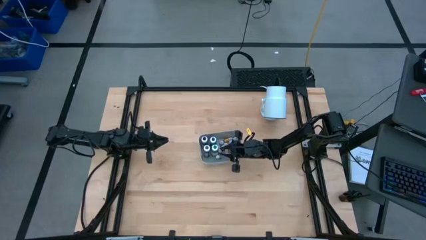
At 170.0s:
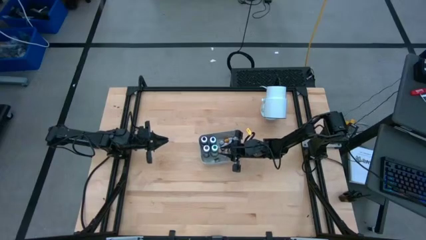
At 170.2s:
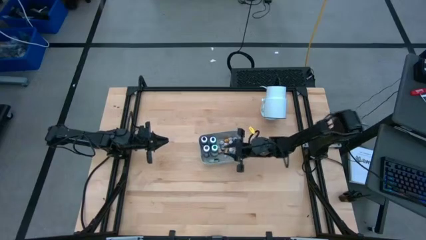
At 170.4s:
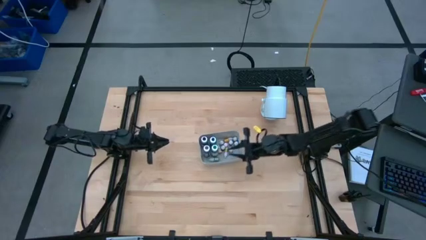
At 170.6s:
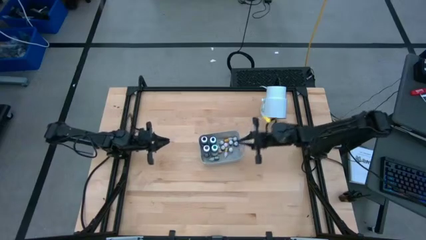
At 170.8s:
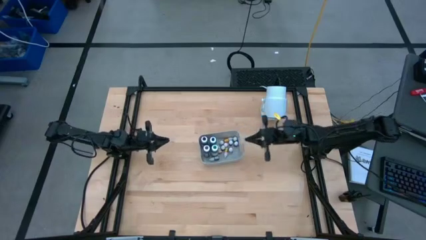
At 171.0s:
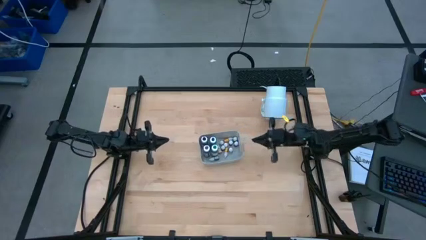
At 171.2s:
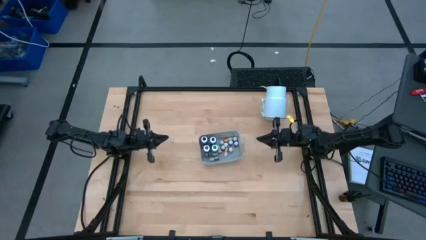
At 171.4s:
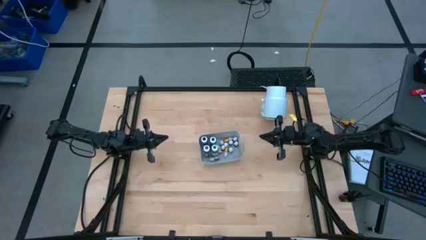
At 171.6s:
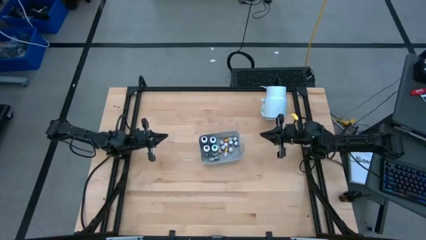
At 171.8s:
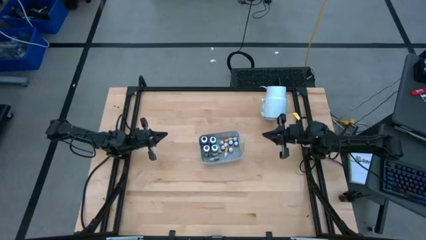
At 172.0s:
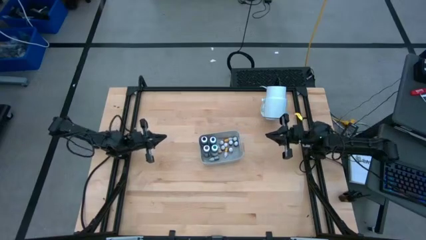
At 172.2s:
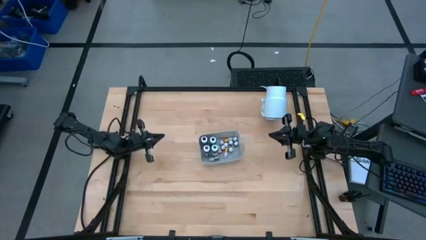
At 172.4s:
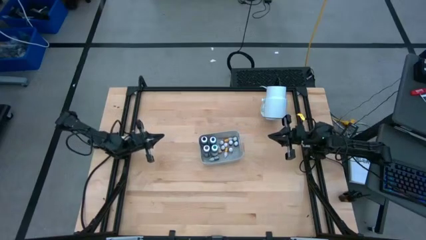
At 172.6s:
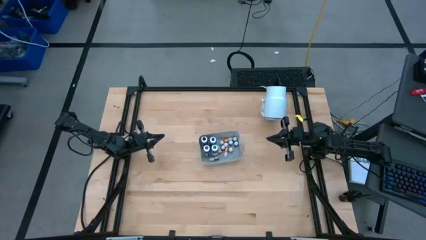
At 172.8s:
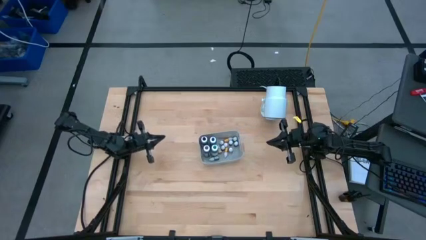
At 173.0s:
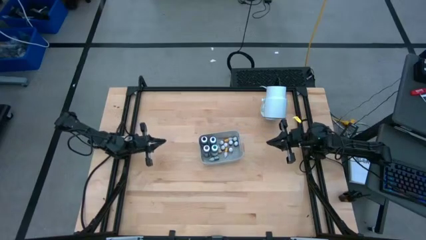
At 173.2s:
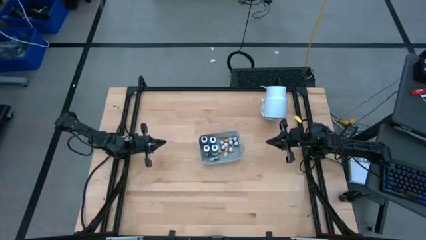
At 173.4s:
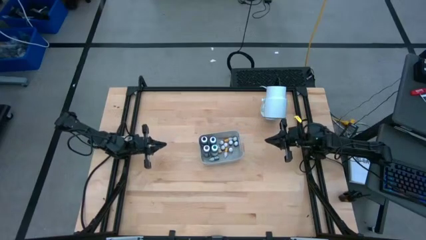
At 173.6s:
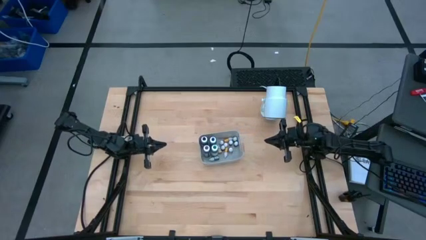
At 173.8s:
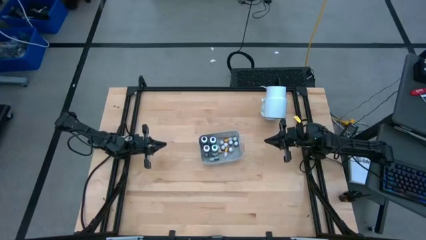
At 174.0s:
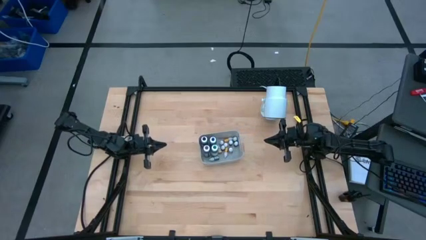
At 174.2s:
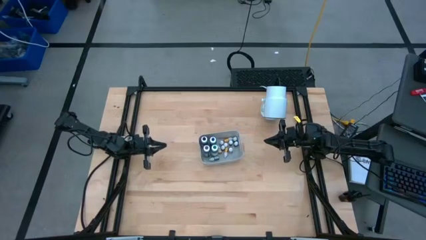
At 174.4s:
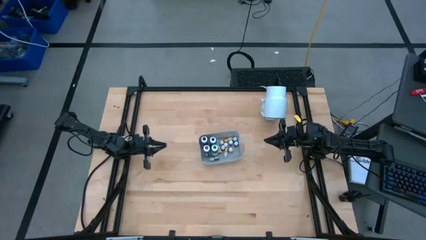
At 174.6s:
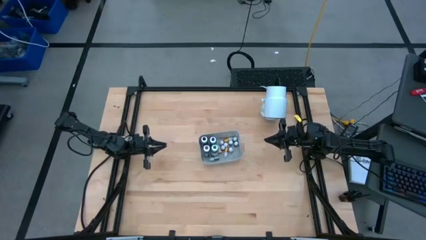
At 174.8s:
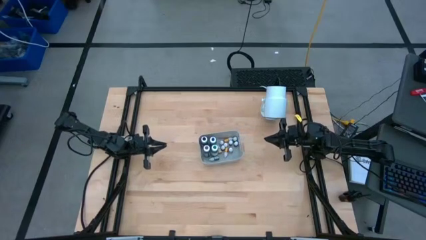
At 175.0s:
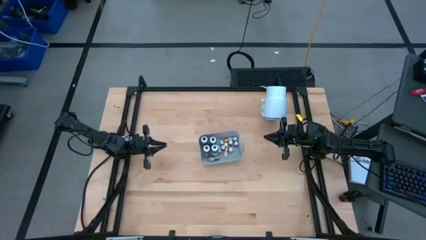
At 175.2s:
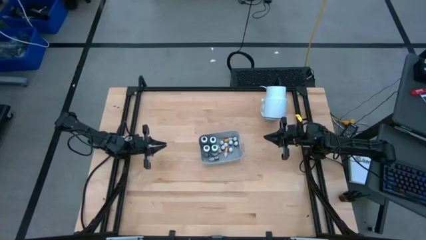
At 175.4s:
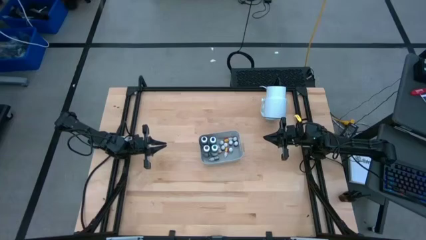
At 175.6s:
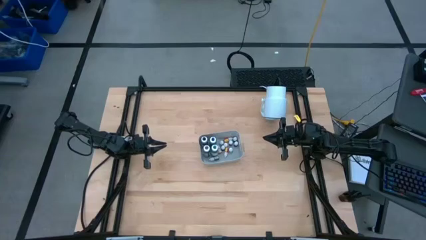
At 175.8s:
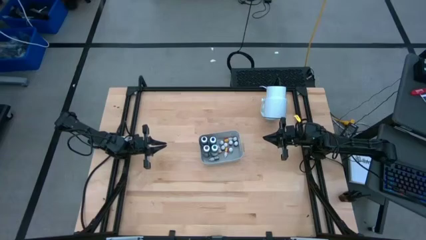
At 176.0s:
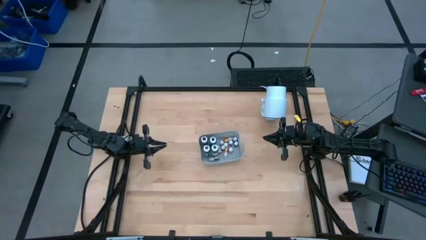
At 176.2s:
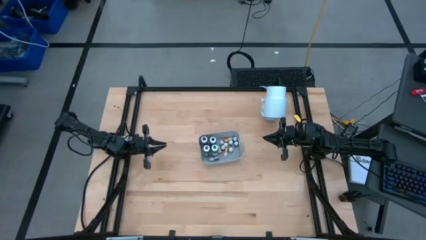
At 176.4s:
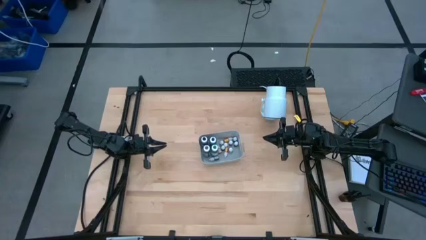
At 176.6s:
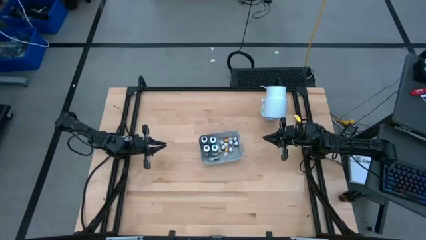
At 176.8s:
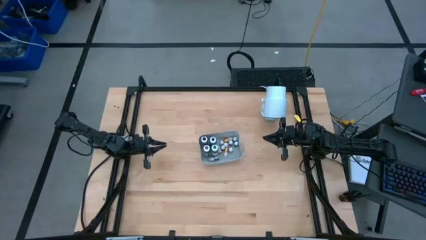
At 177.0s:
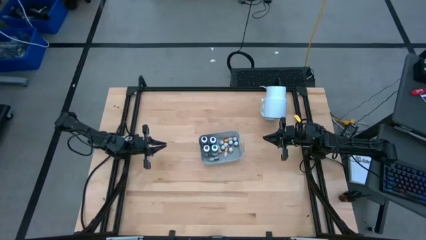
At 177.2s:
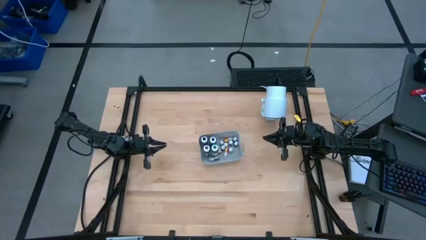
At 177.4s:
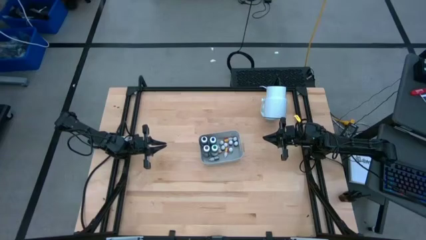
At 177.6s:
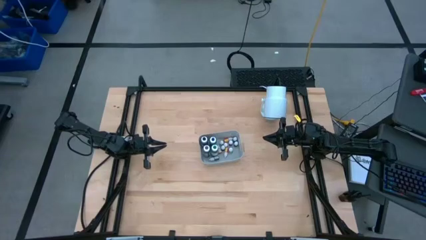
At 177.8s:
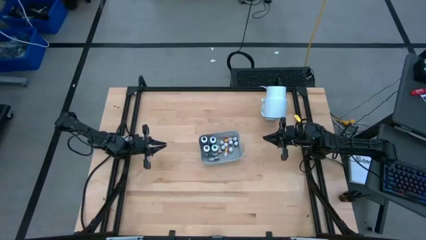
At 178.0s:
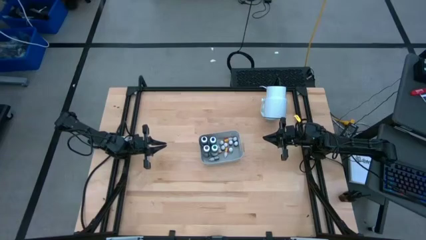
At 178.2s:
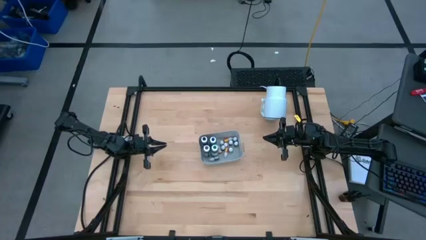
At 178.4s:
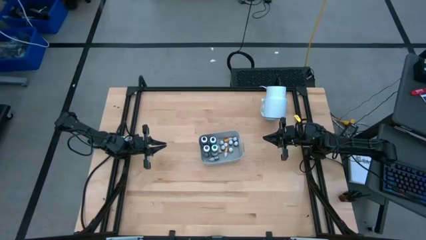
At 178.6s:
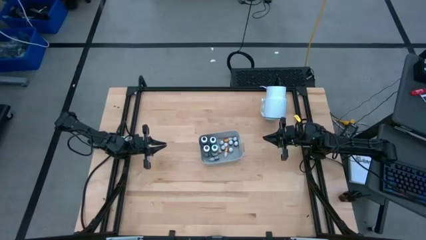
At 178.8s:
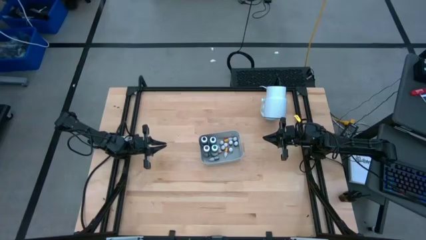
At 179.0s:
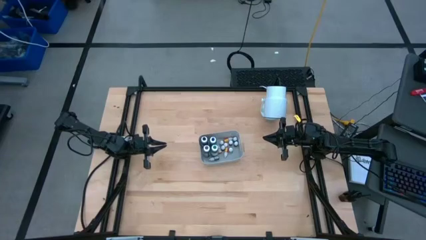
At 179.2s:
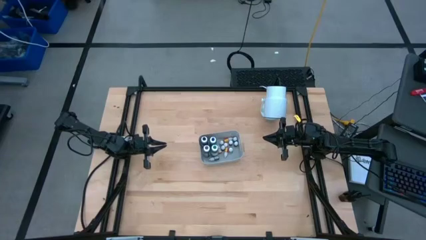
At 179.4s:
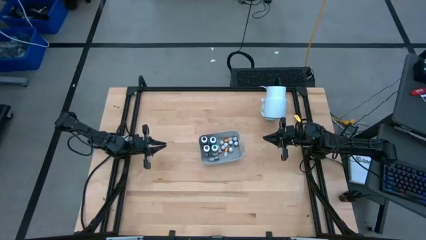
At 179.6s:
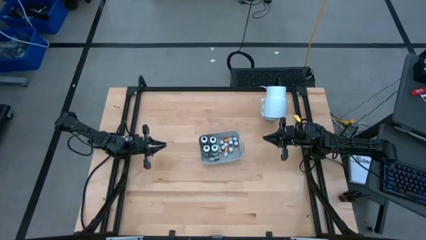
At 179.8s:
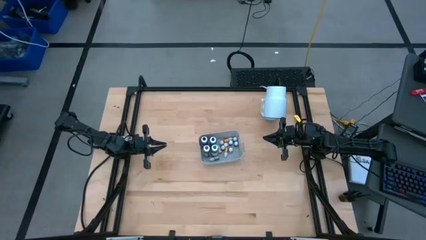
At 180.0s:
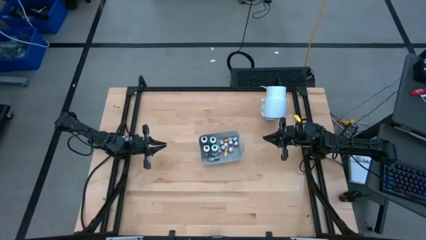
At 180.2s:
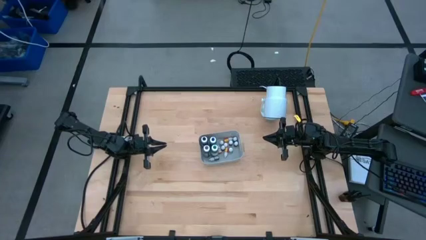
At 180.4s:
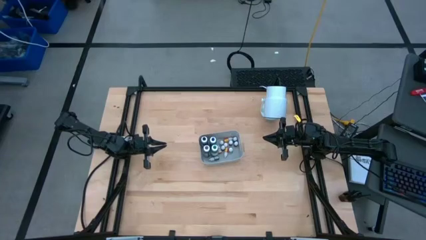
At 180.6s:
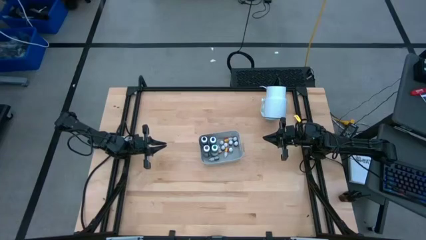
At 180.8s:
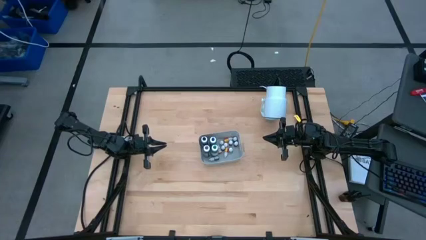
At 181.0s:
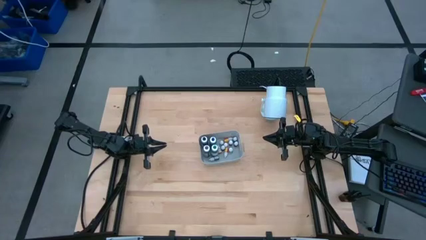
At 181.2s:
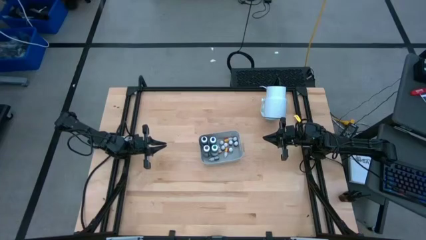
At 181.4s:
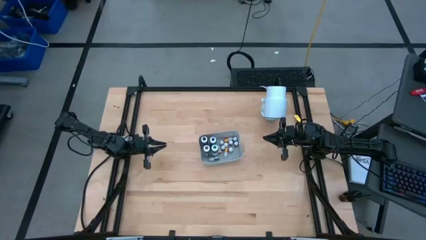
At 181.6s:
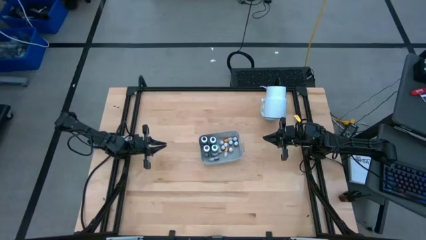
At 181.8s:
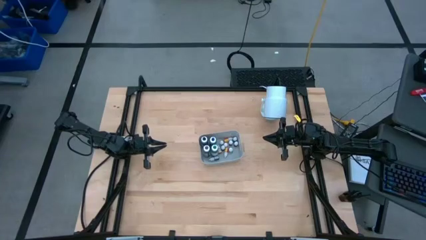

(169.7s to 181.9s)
Task: Pick & Place food coloring
Return to Home Position

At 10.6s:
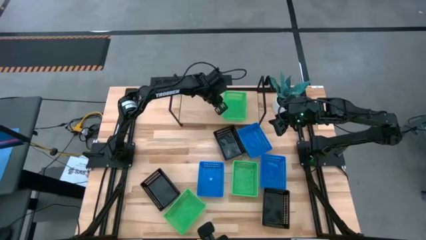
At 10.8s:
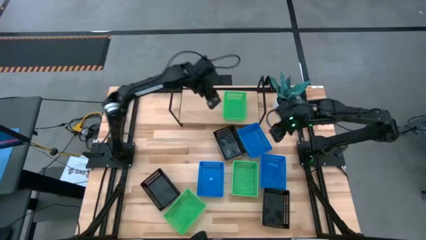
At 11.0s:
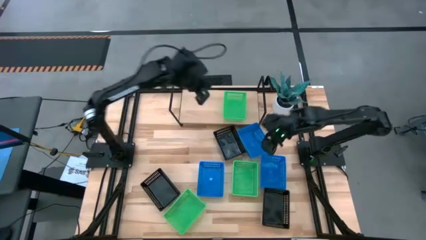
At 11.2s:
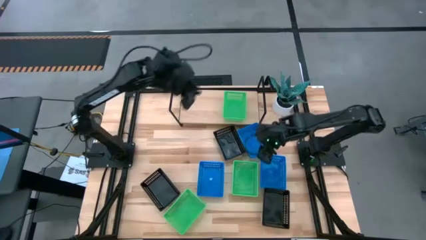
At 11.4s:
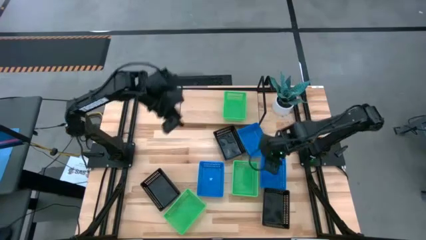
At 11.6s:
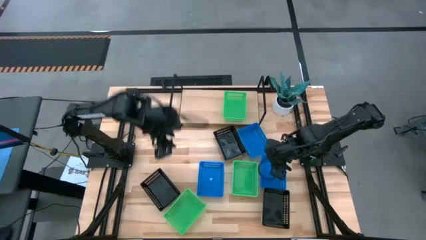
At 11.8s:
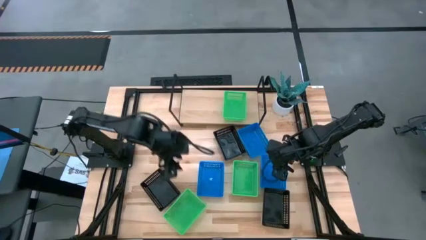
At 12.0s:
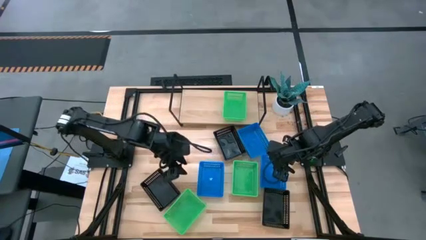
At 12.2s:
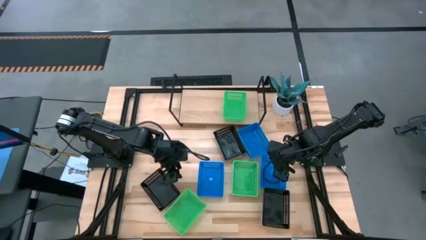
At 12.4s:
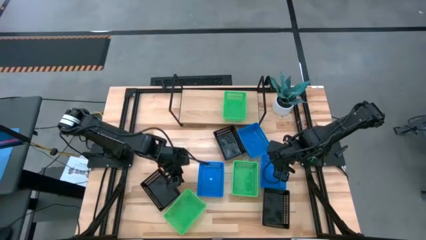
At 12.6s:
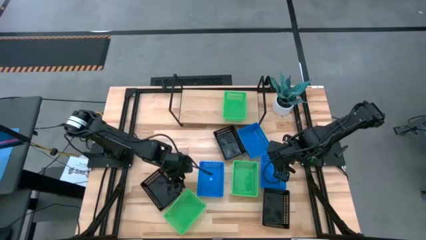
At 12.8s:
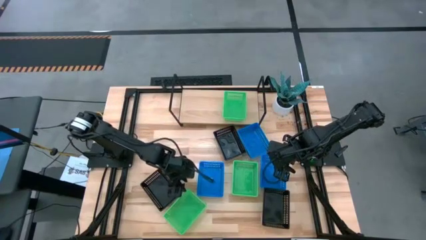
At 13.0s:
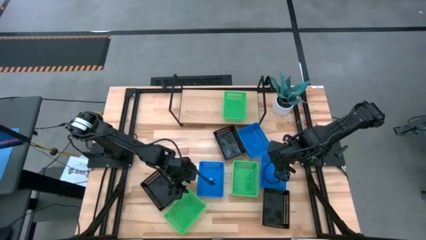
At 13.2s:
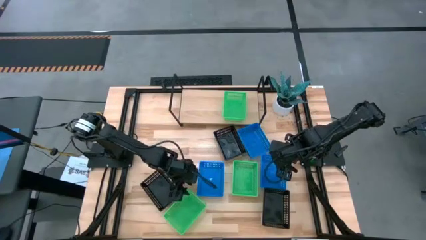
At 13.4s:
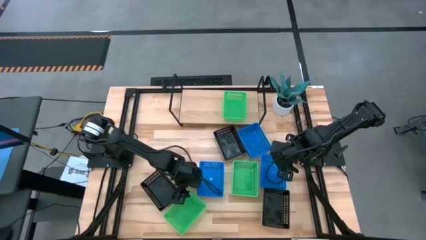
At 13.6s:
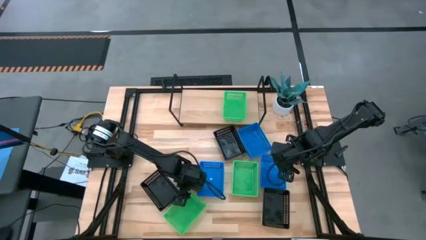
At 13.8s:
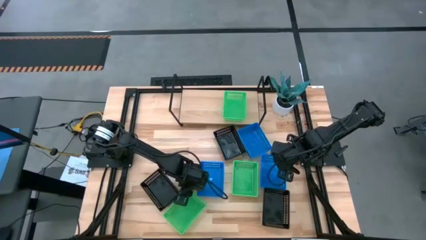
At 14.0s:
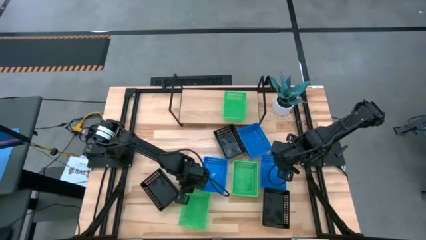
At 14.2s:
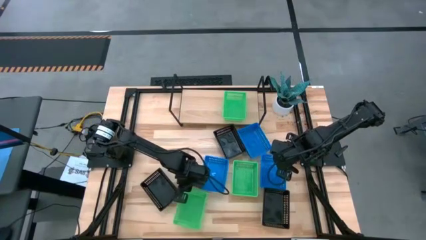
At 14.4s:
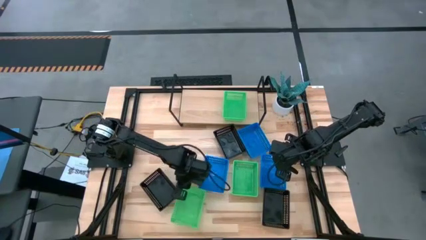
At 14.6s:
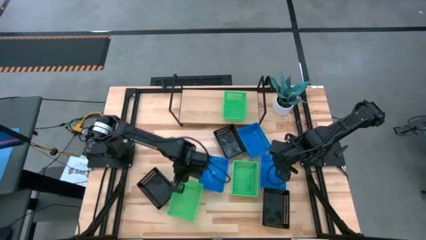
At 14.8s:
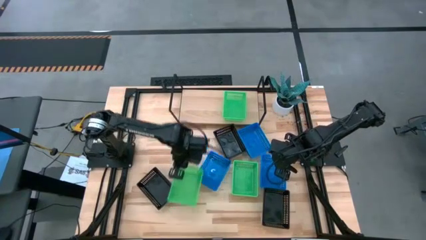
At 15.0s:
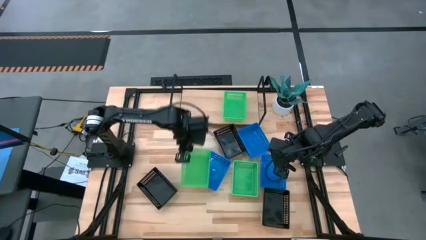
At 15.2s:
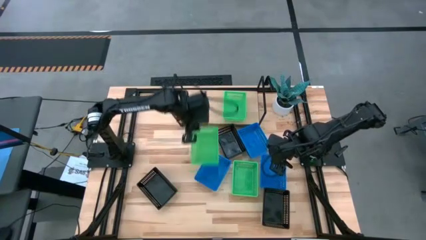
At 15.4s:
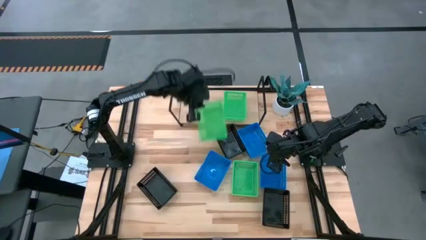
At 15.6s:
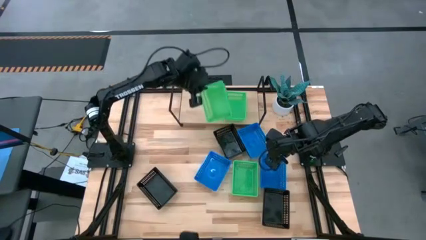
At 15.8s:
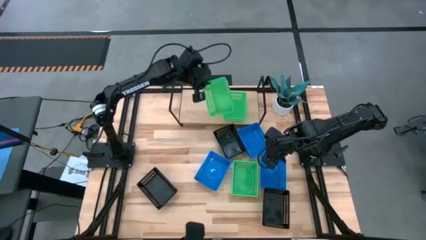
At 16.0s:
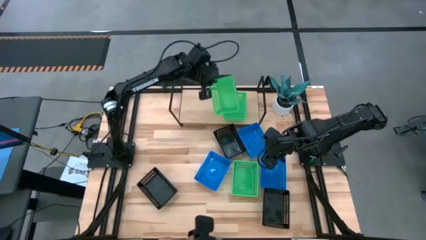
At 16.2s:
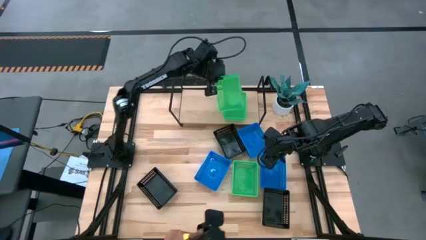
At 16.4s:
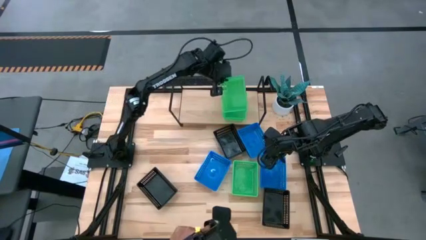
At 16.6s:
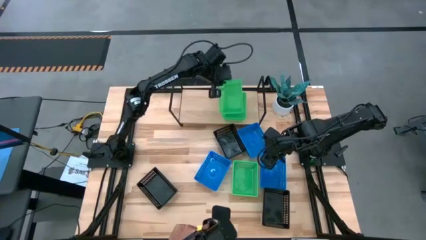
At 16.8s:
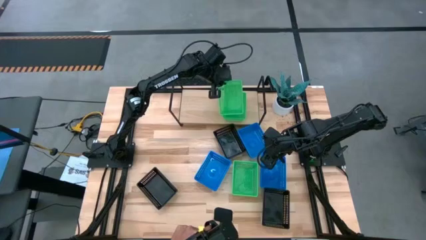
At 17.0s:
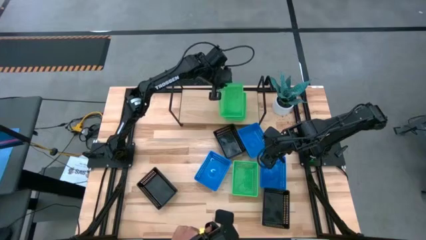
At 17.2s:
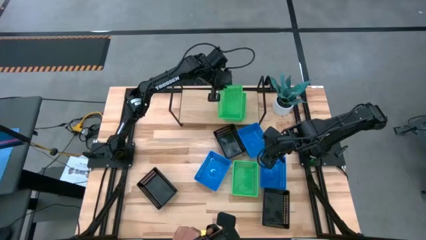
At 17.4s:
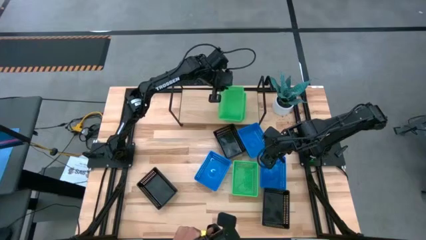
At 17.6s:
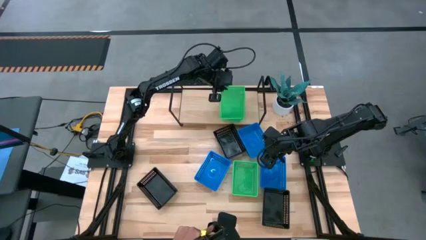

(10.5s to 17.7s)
Task: Stack baskets on shelf by color
Stack the left green bin on top of the other green bin on the shelf
